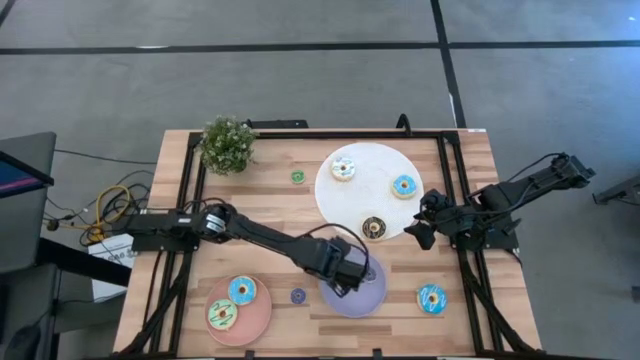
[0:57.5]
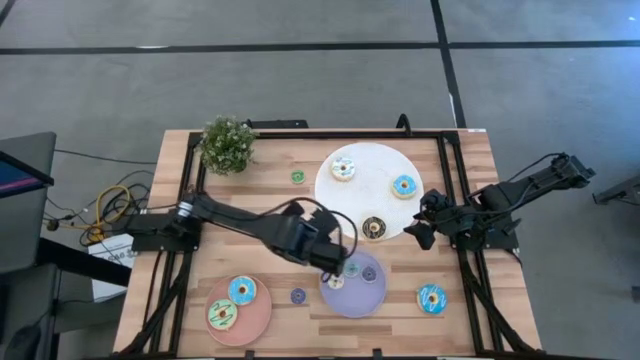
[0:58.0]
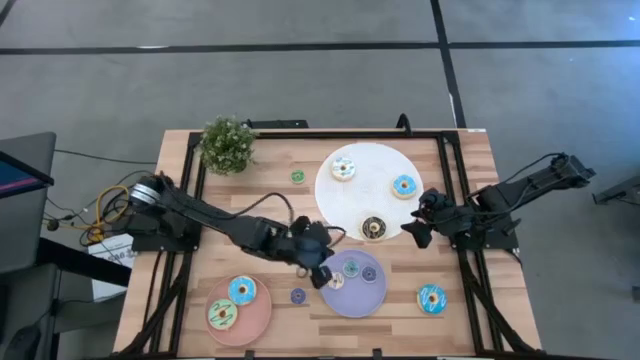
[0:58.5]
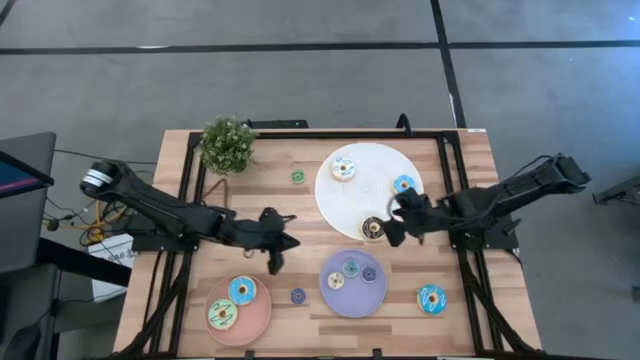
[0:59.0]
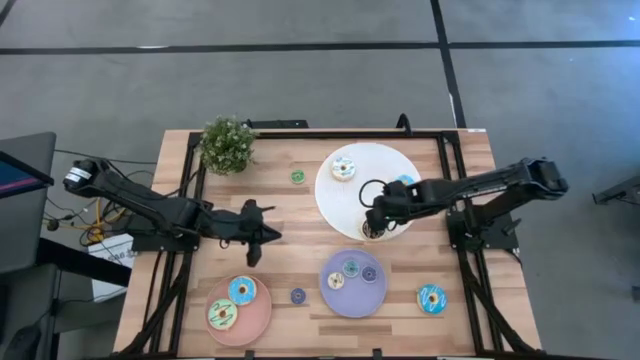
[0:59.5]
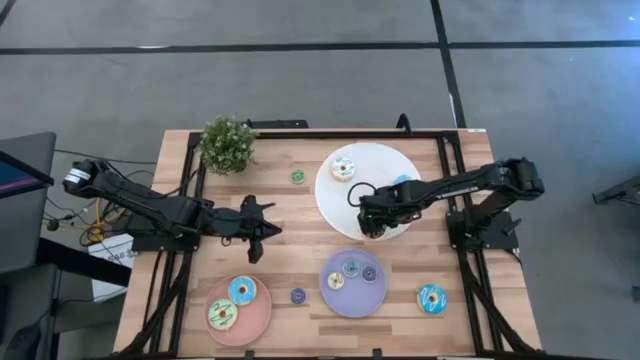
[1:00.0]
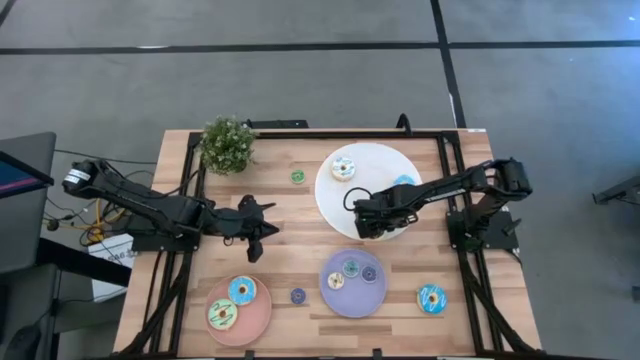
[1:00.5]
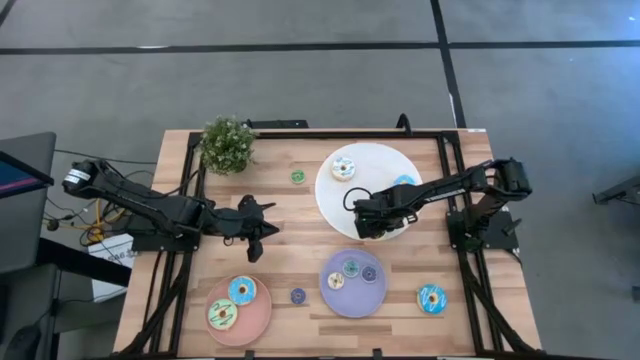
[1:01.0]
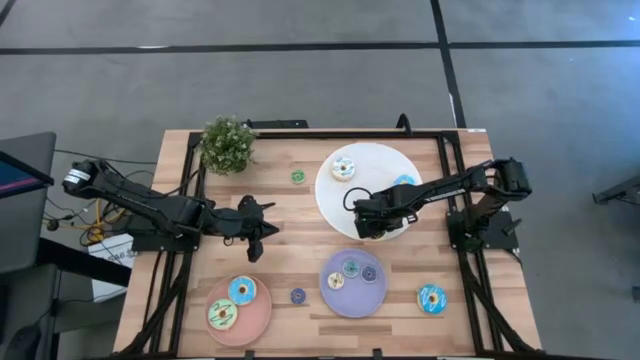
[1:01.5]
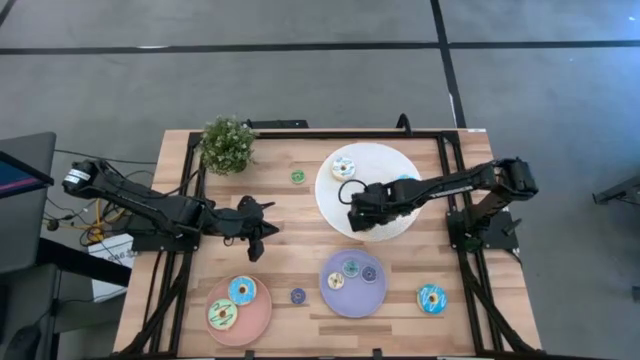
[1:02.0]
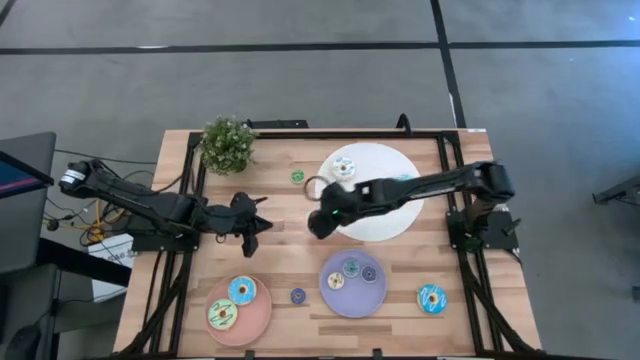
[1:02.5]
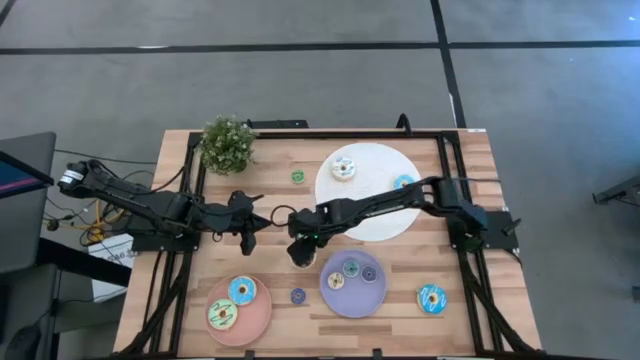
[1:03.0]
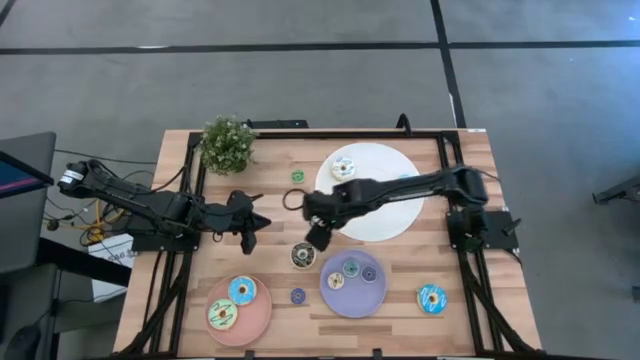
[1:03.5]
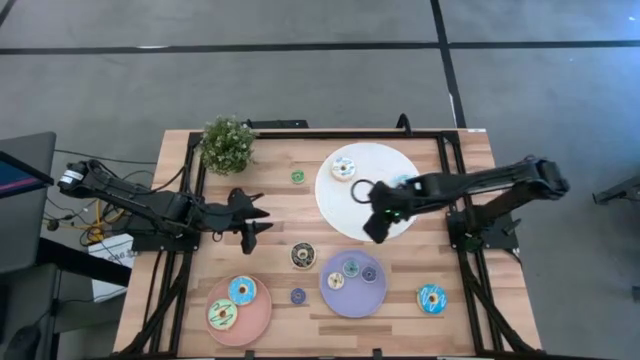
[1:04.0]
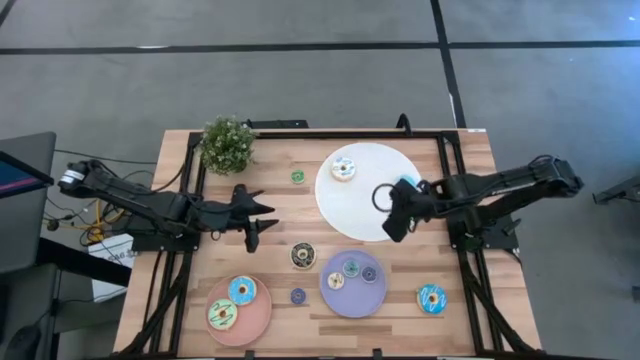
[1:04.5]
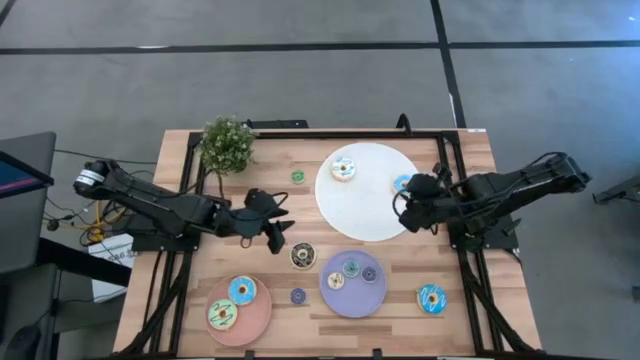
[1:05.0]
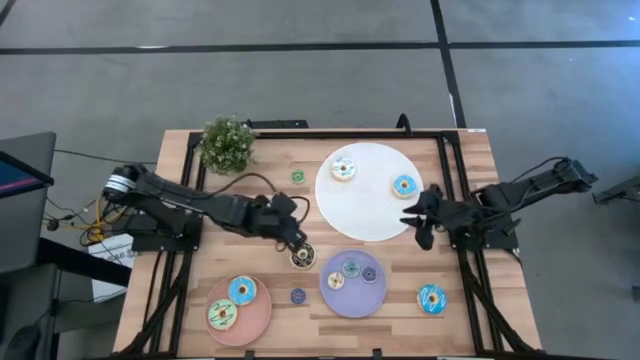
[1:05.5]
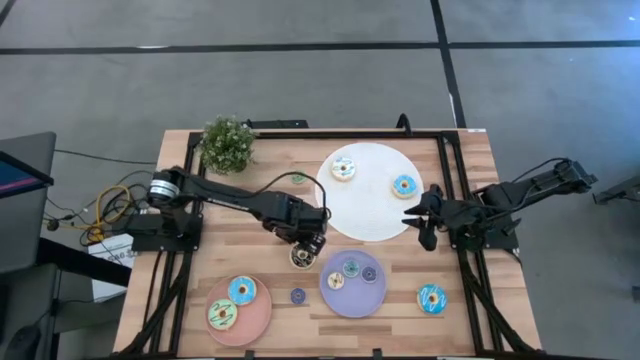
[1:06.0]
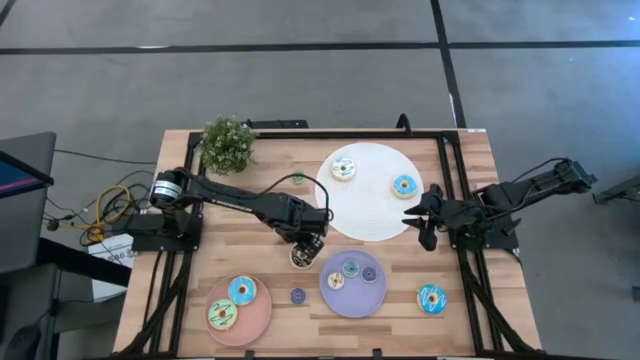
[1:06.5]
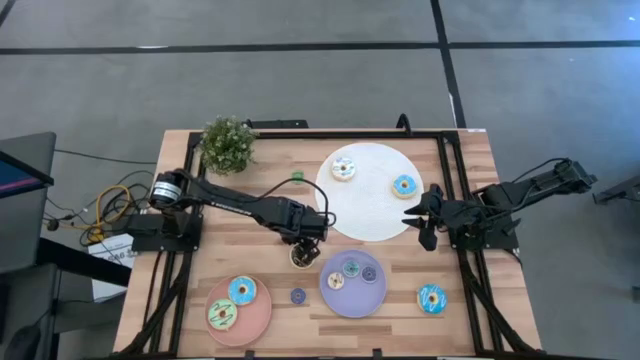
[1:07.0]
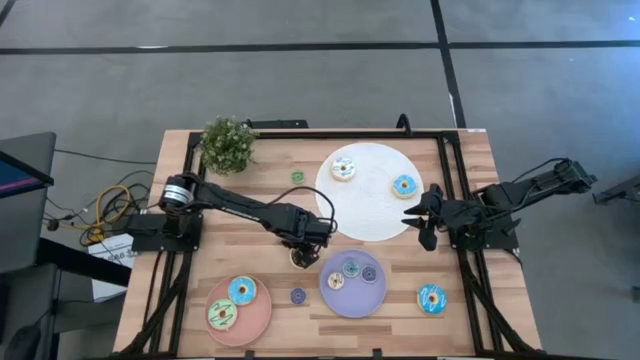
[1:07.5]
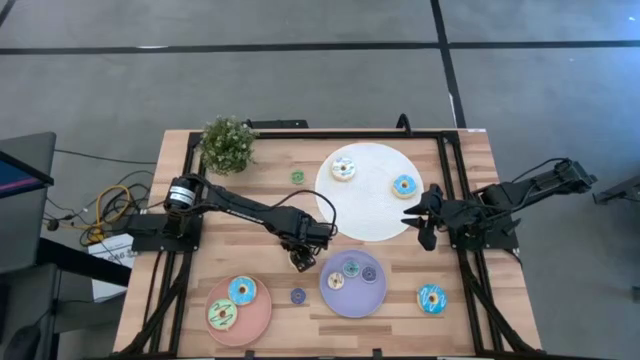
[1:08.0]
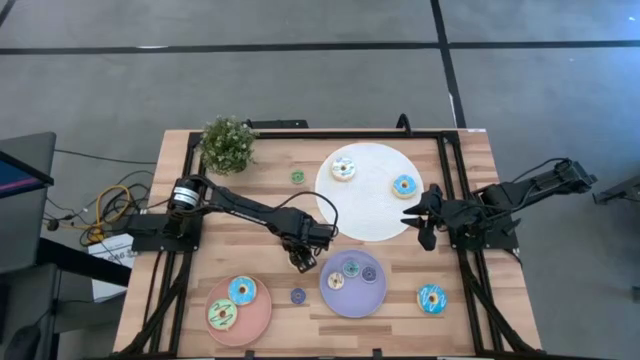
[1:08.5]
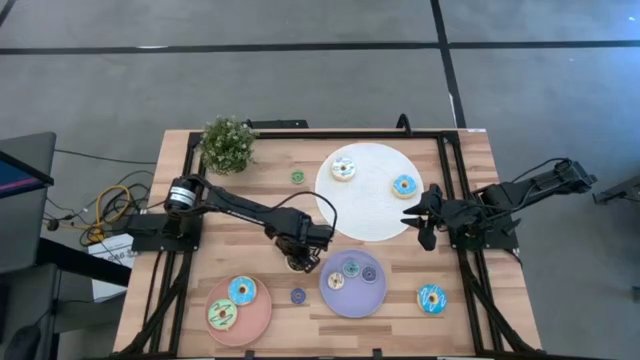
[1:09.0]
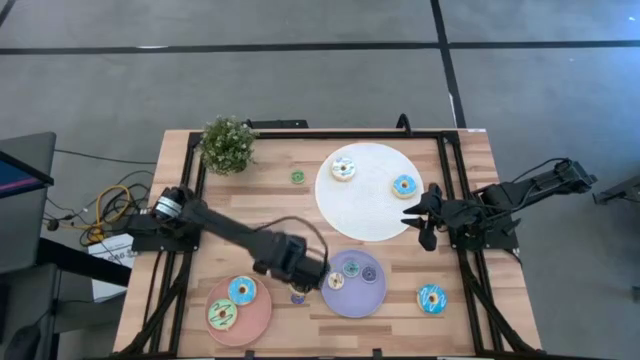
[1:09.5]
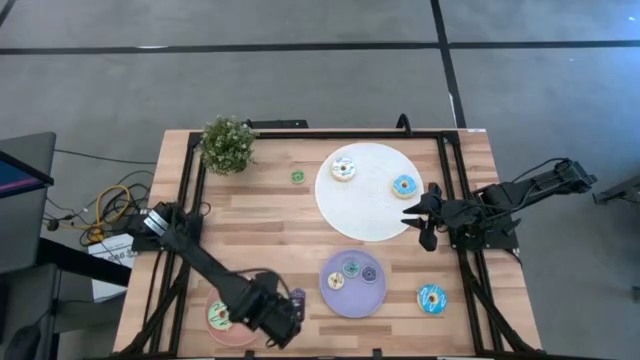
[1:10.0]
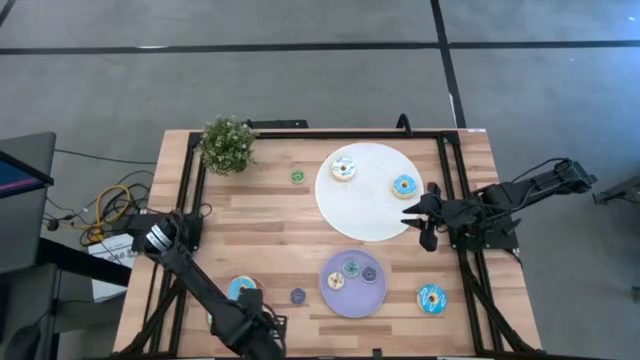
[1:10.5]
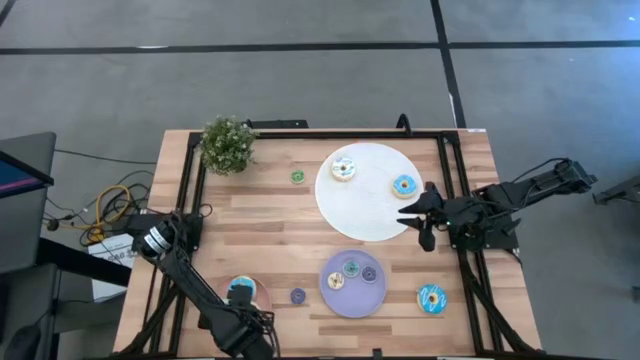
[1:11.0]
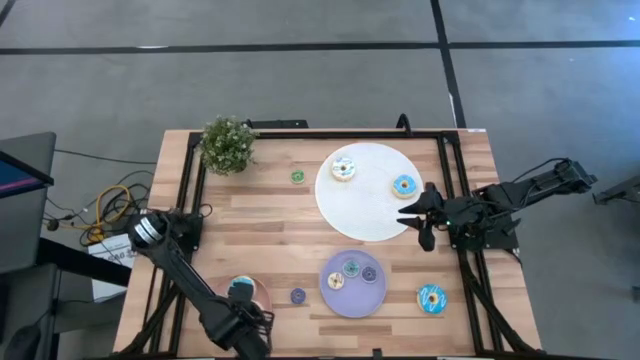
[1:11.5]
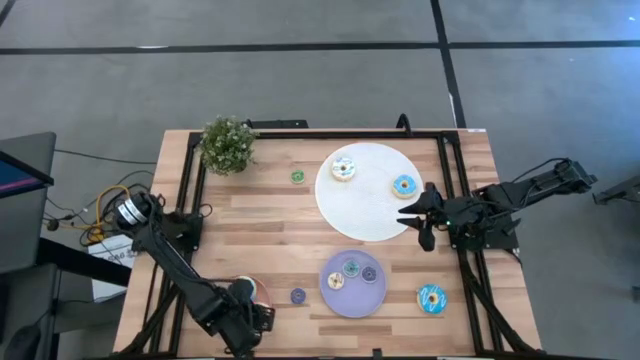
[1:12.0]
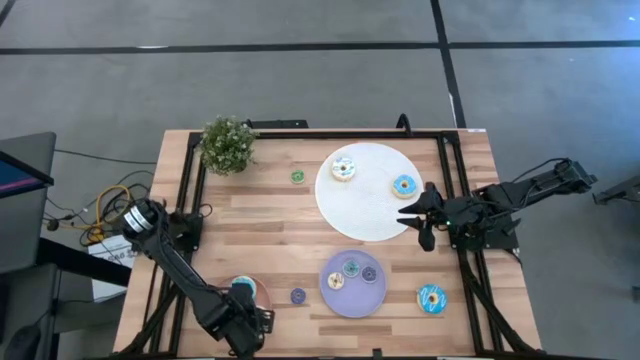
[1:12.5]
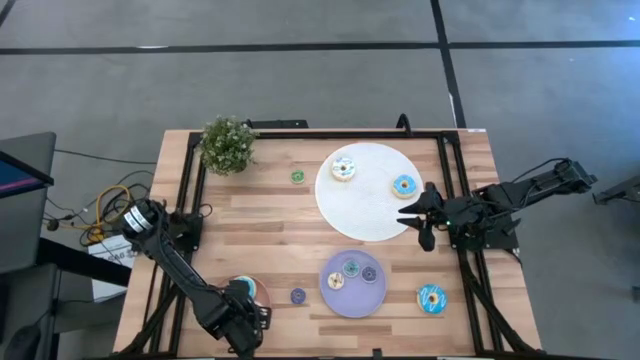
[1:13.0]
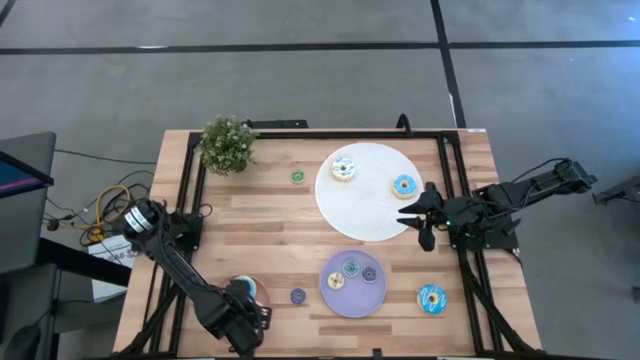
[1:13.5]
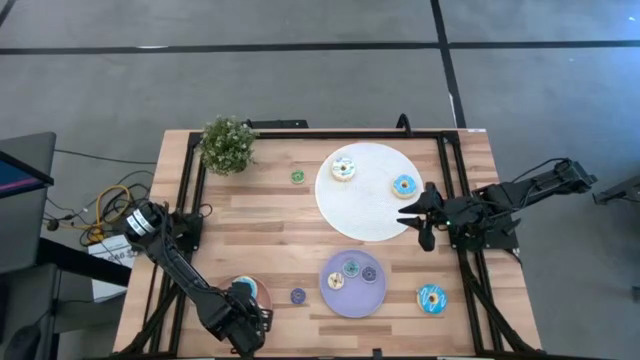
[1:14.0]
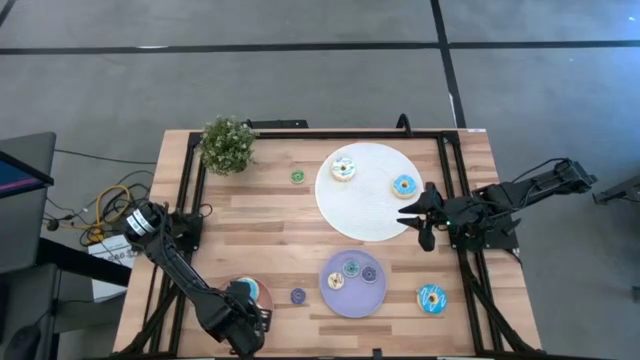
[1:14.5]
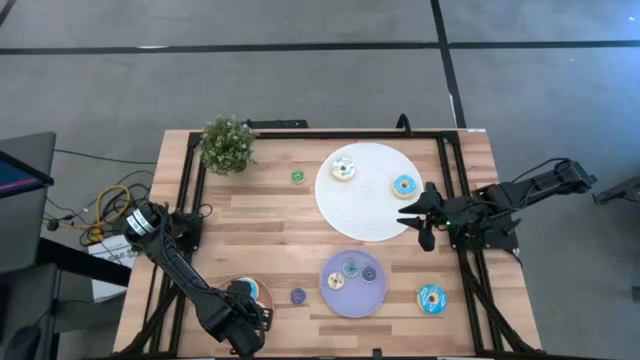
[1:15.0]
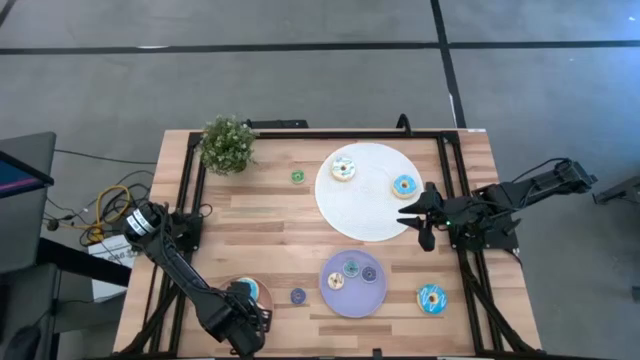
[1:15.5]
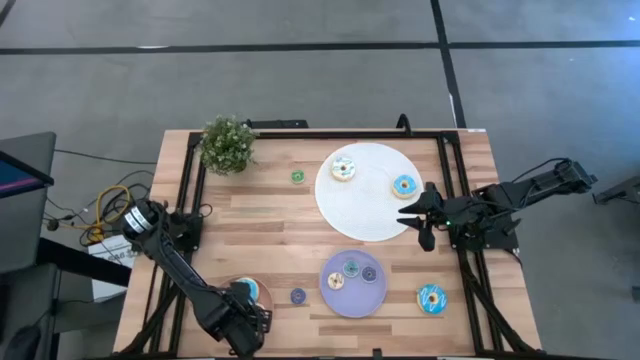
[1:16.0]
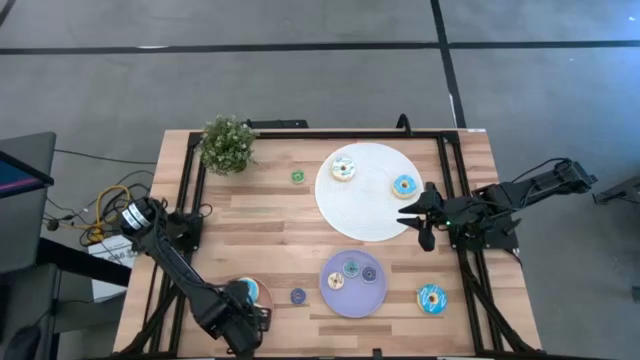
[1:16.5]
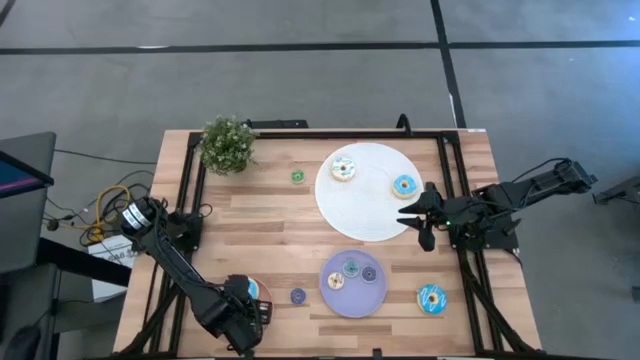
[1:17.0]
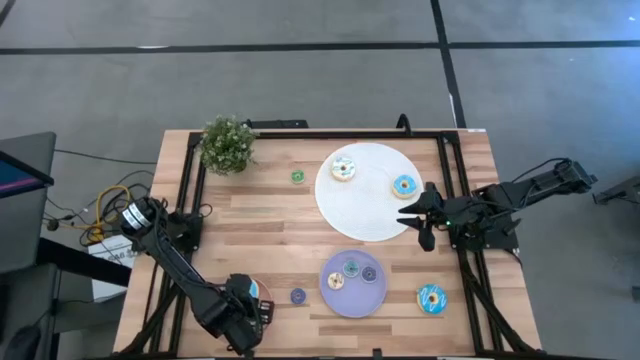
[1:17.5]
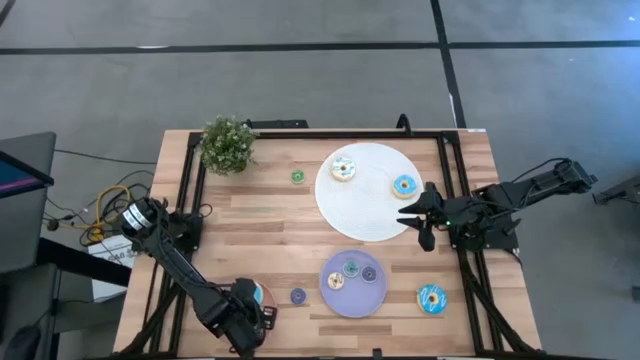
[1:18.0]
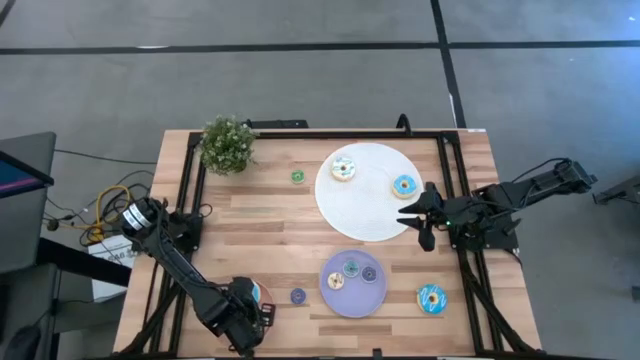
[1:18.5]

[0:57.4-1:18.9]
Task: Pick & Place donuts
Put the big black donut on the pink plate

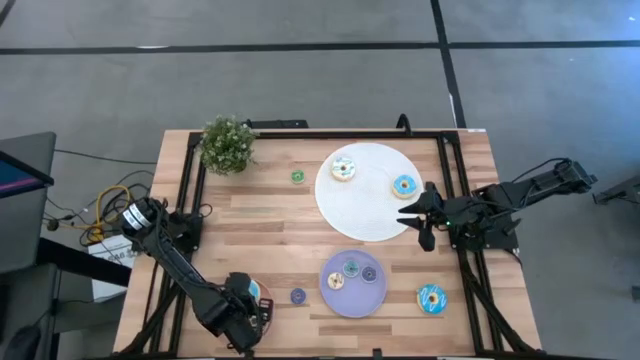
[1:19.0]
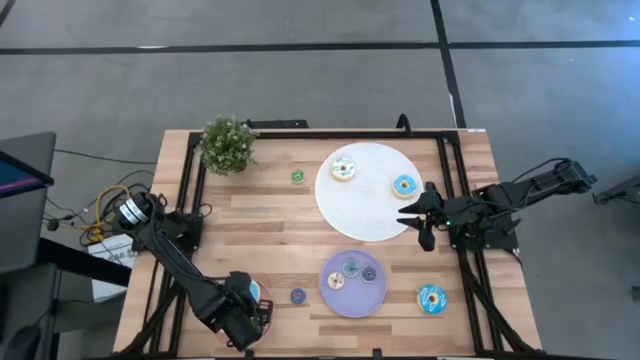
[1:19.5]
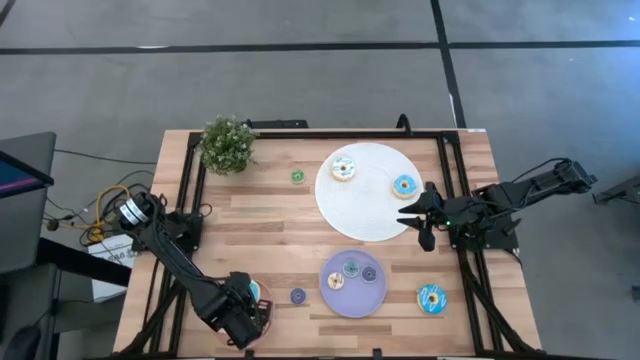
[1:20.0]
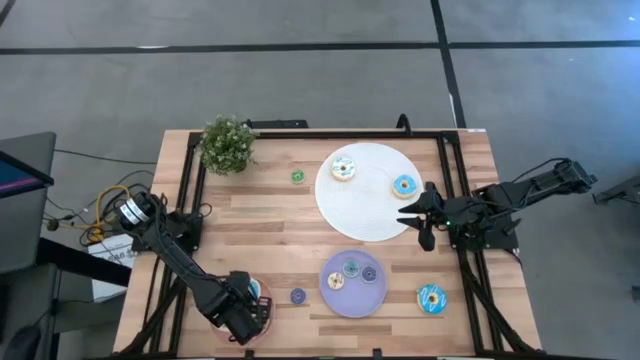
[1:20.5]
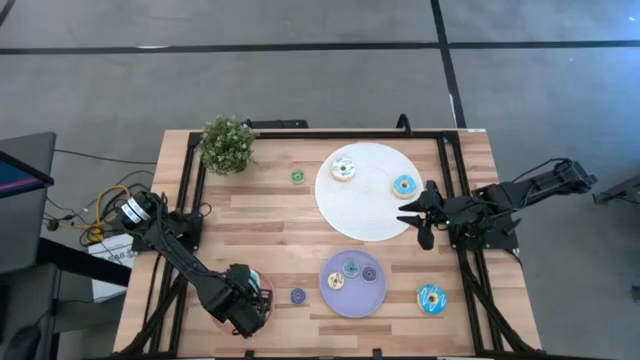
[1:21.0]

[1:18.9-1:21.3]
Adjust the pink plate
